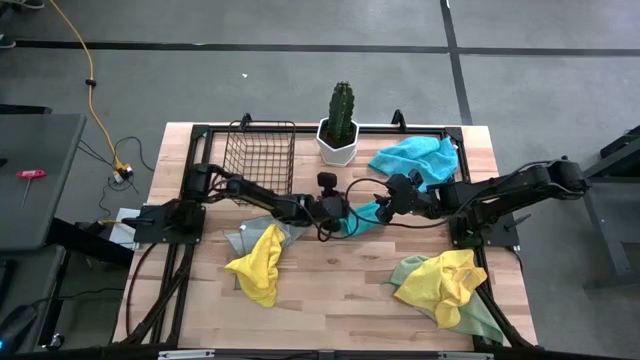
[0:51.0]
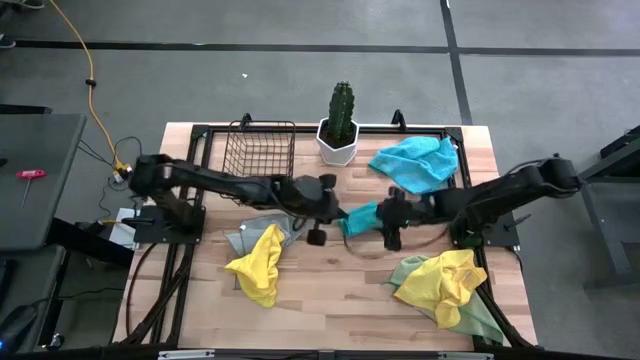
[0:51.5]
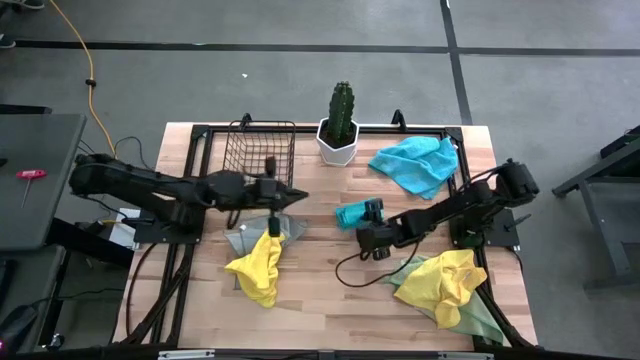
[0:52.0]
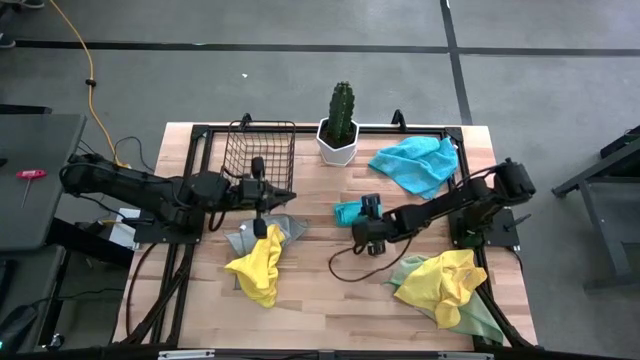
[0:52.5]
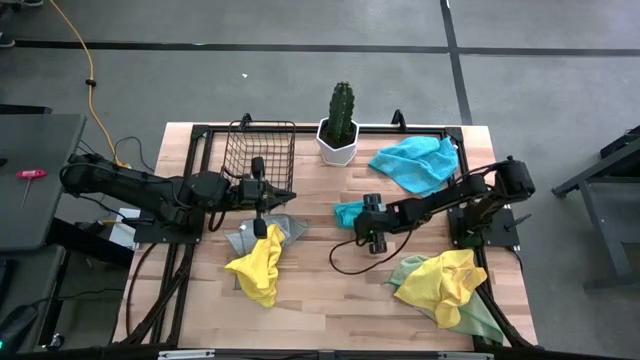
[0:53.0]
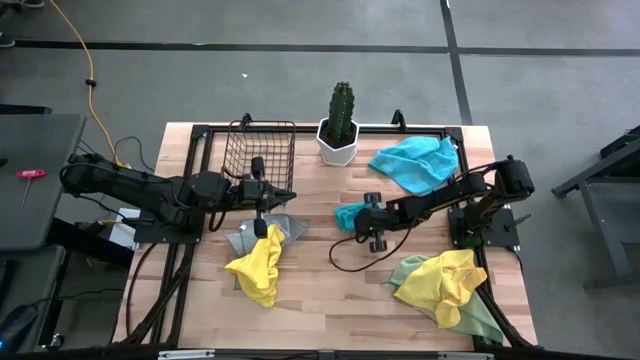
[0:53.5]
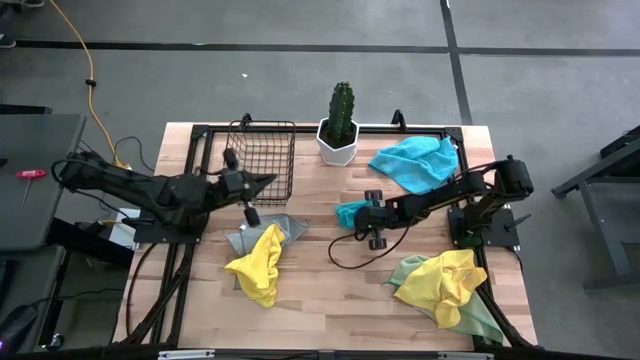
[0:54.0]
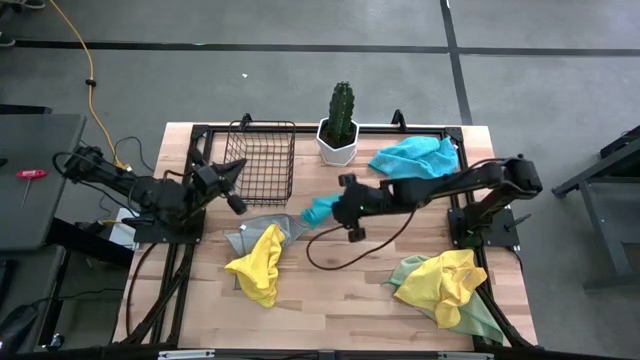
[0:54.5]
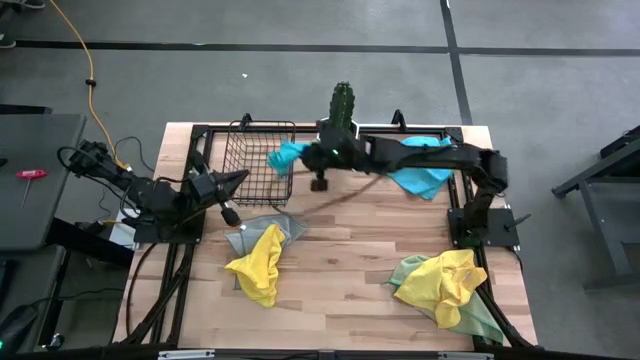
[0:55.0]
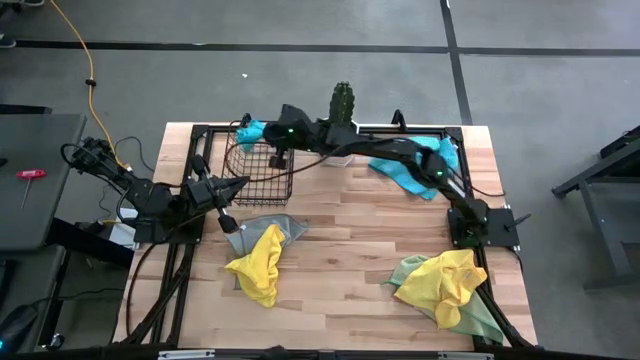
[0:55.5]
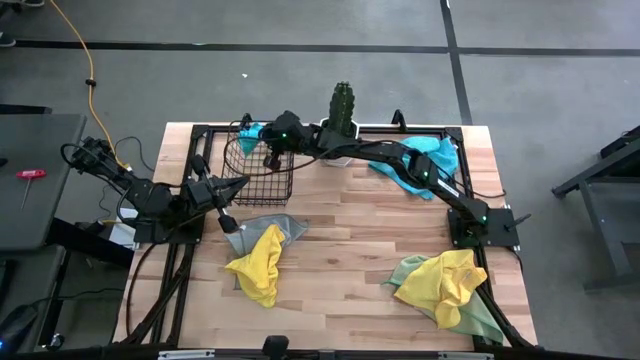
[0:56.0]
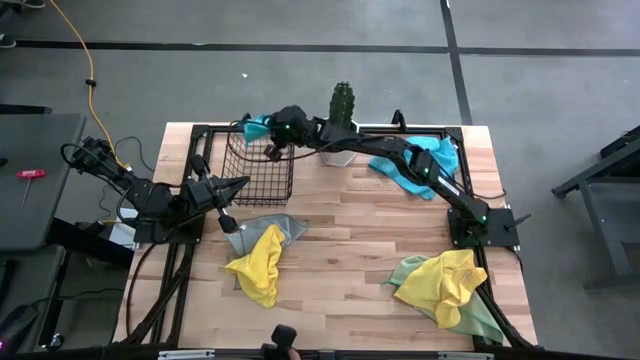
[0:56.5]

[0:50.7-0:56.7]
Task: Fold microfiber towels
Put the folded blue microfiber towel into the mesh basket

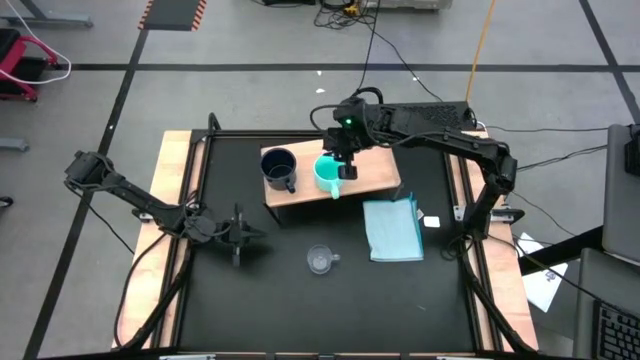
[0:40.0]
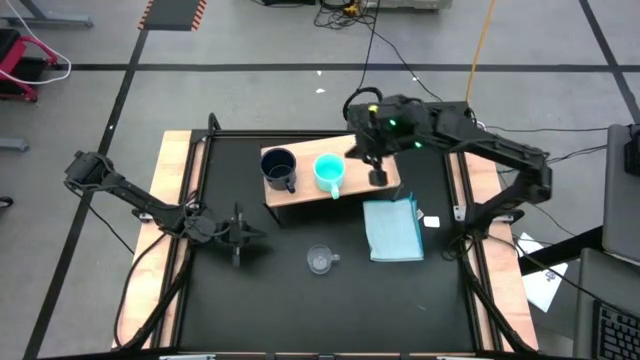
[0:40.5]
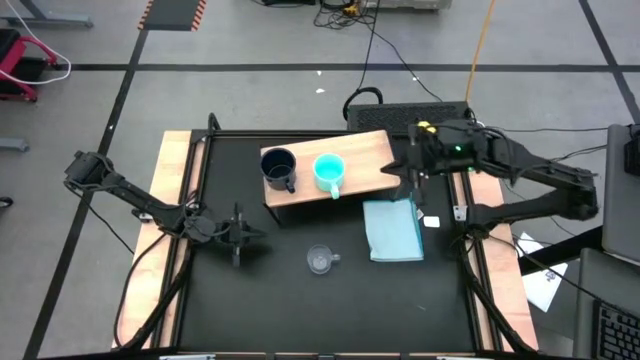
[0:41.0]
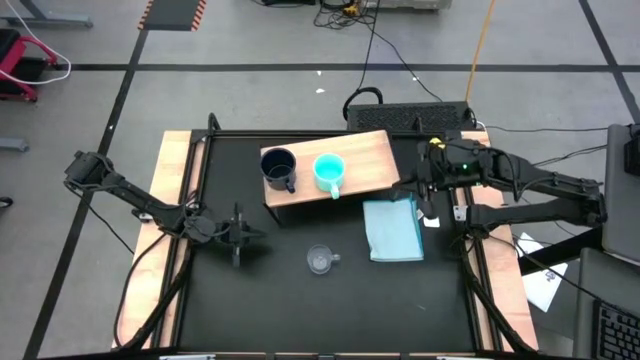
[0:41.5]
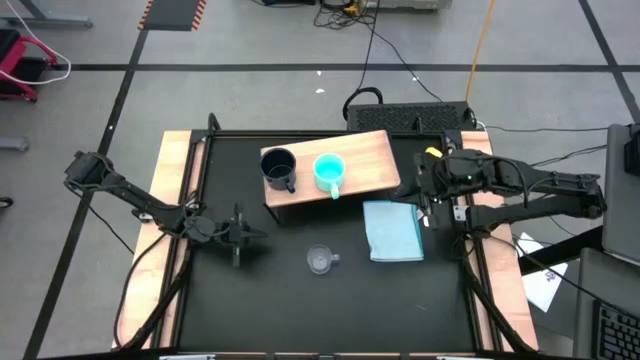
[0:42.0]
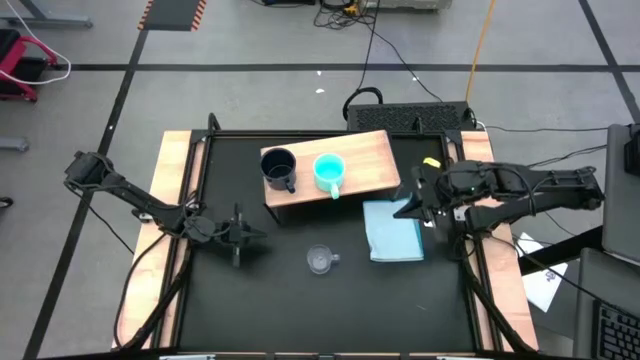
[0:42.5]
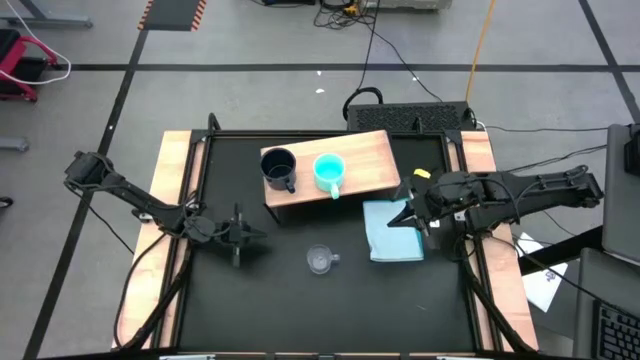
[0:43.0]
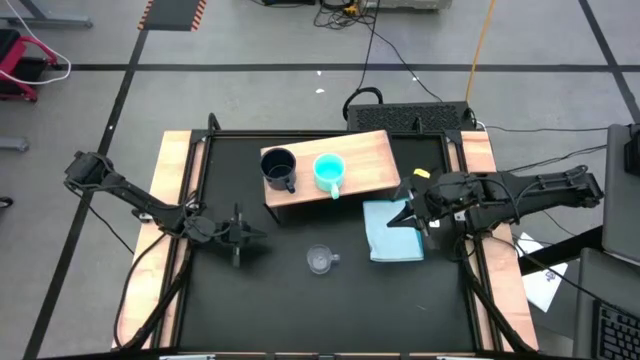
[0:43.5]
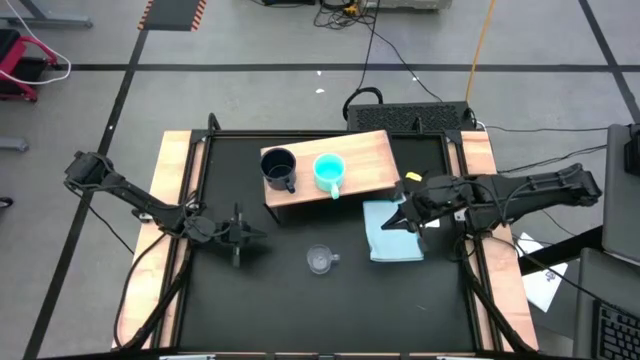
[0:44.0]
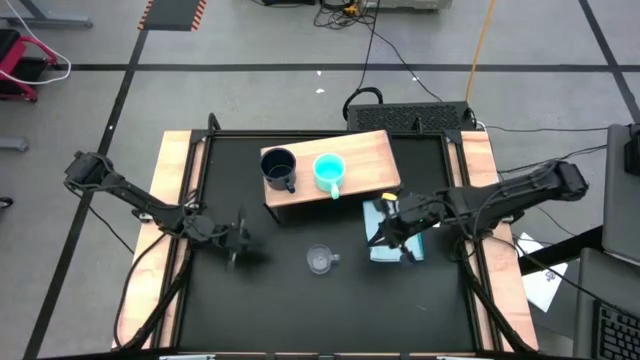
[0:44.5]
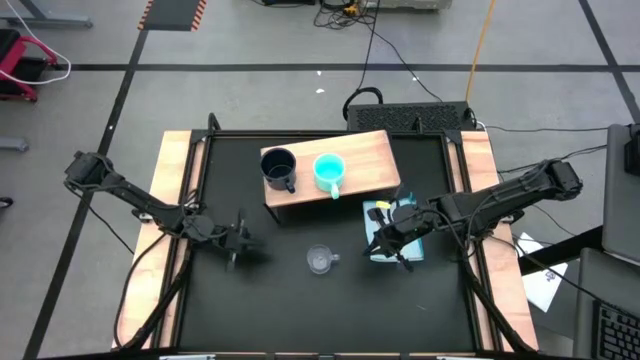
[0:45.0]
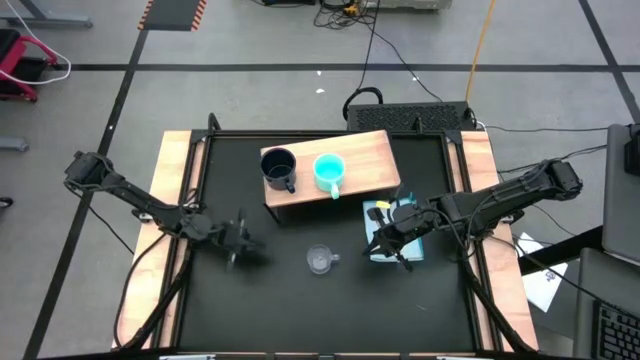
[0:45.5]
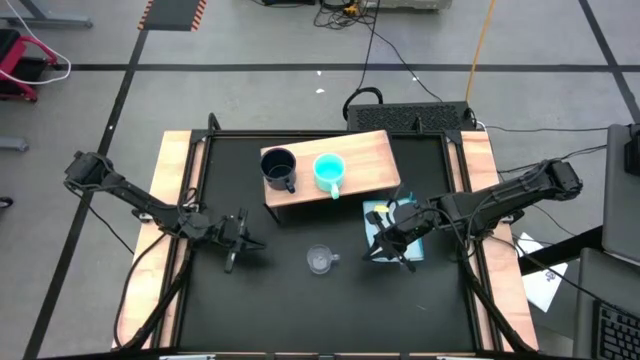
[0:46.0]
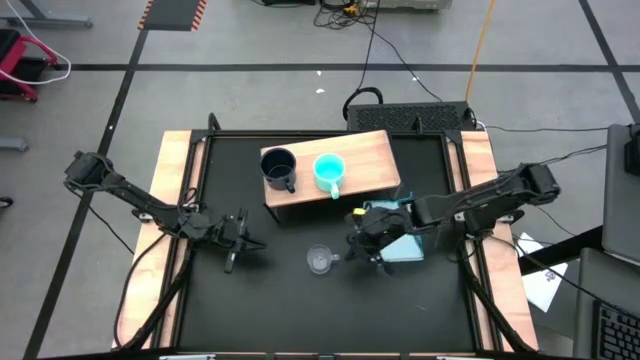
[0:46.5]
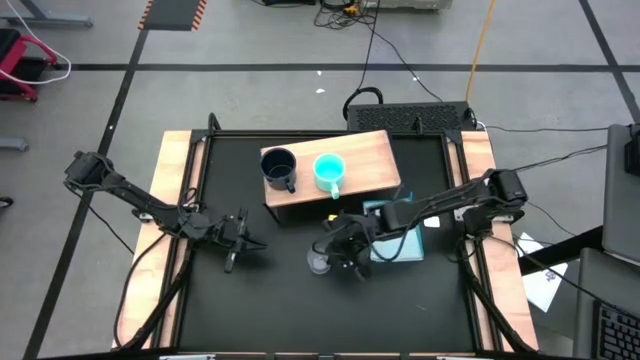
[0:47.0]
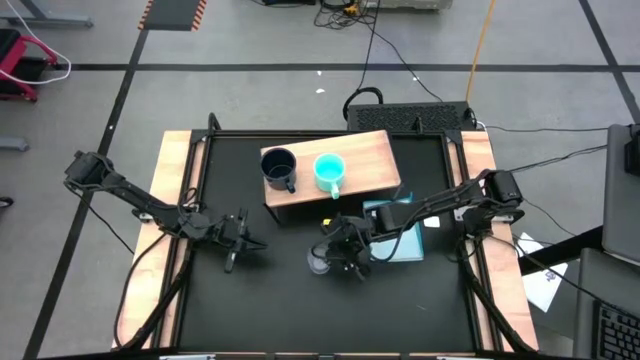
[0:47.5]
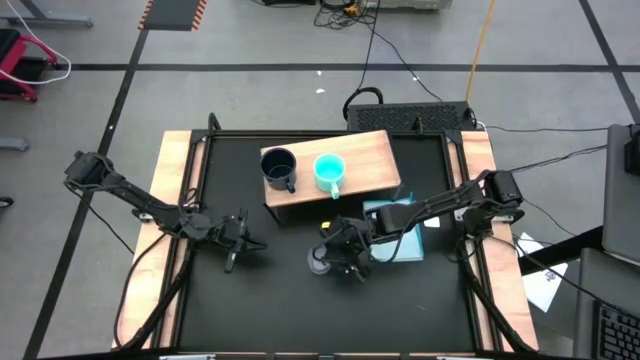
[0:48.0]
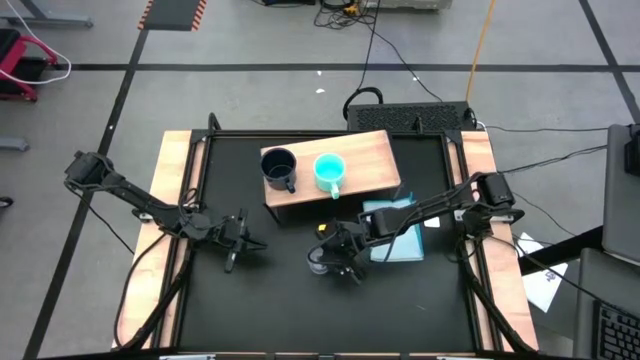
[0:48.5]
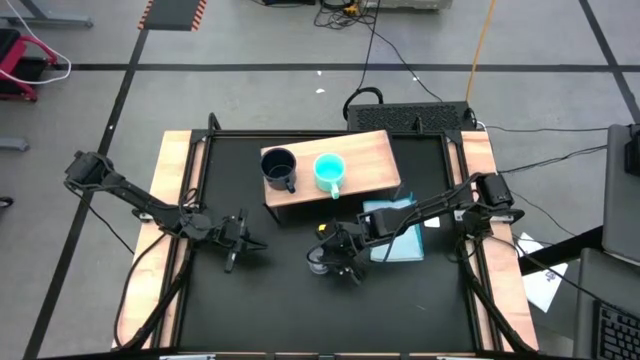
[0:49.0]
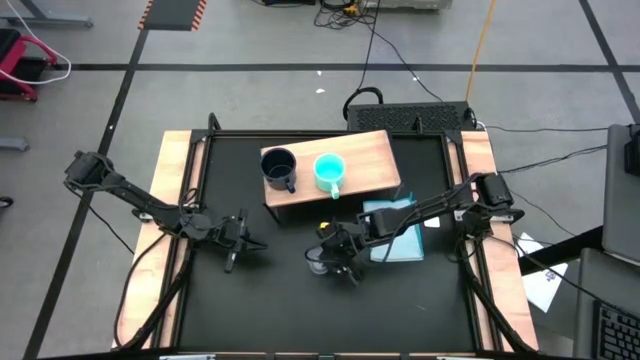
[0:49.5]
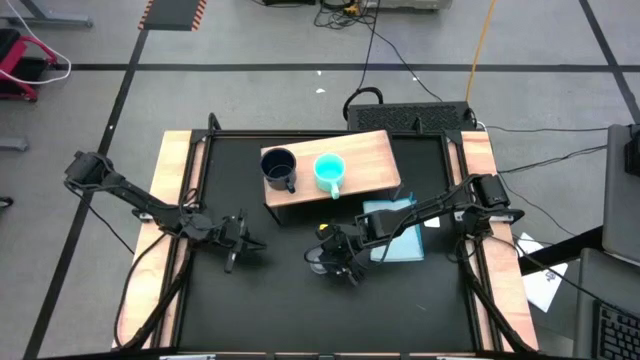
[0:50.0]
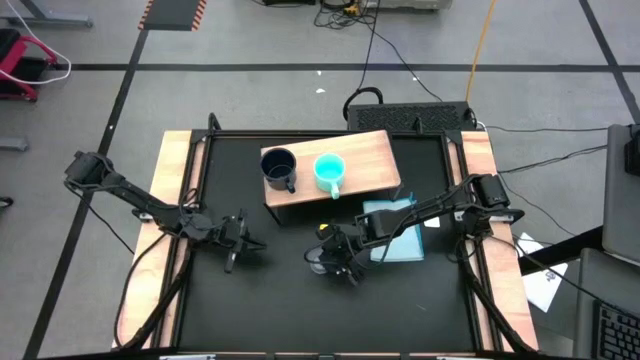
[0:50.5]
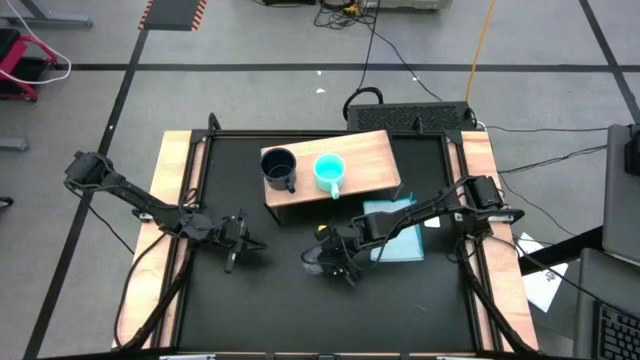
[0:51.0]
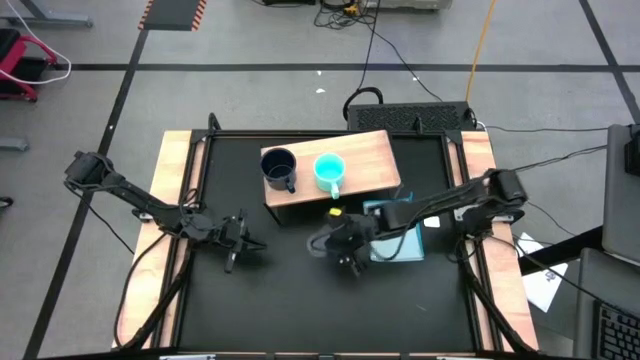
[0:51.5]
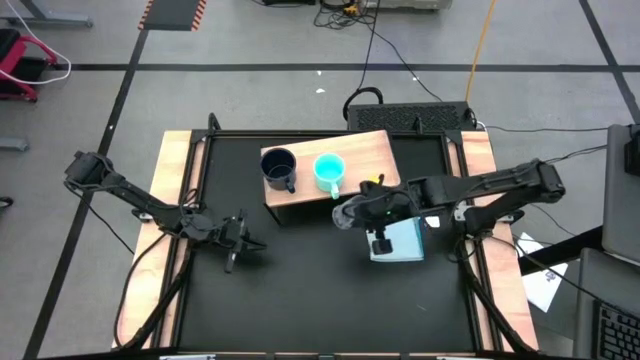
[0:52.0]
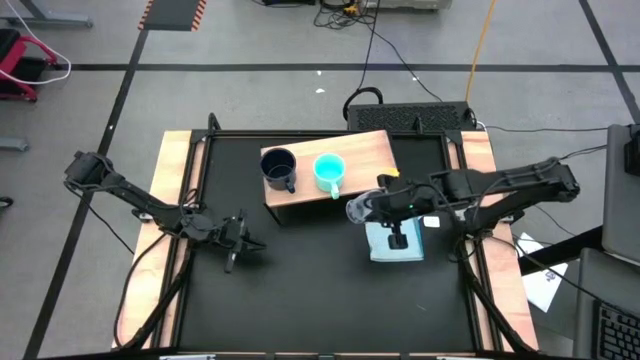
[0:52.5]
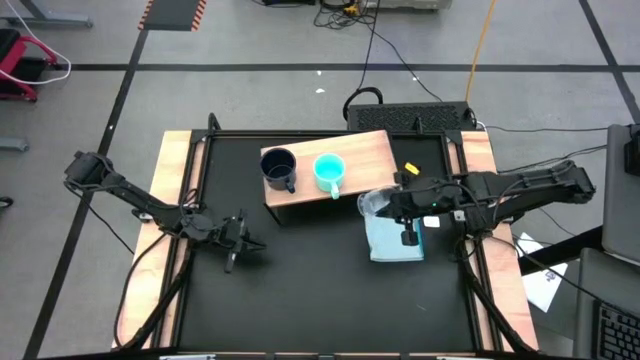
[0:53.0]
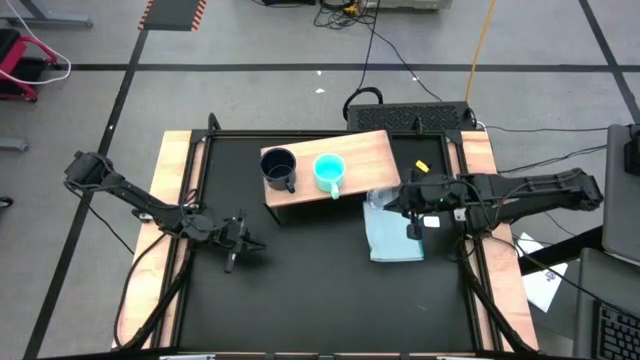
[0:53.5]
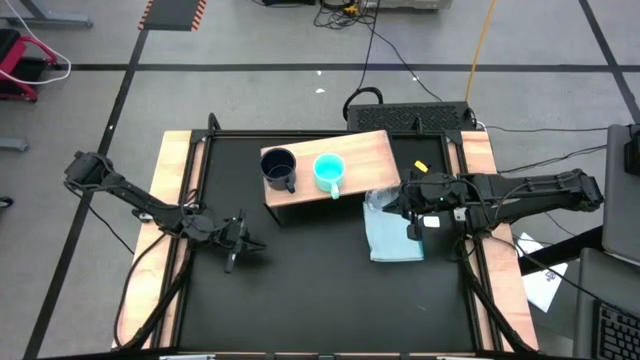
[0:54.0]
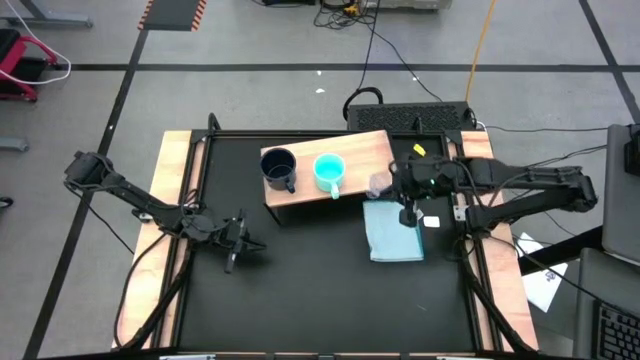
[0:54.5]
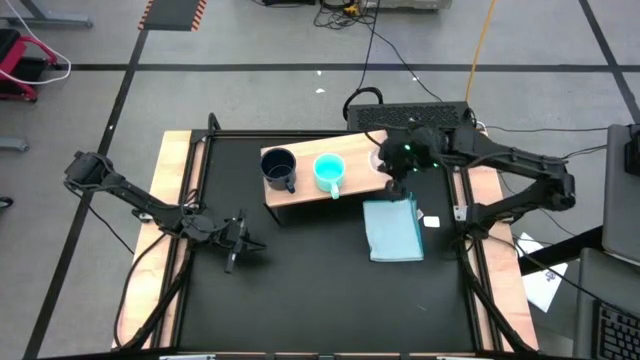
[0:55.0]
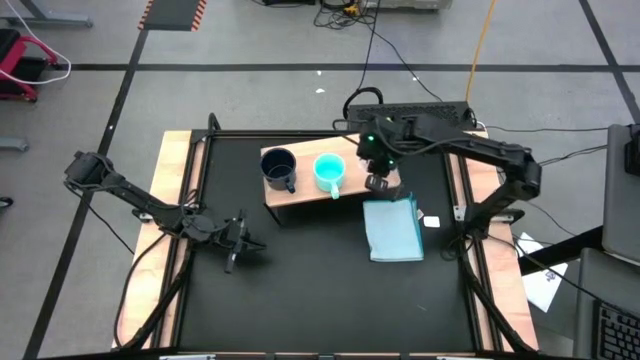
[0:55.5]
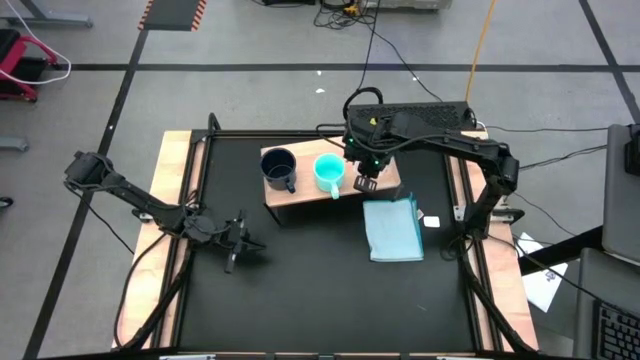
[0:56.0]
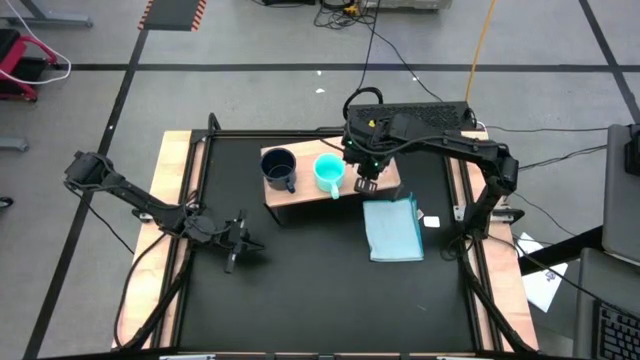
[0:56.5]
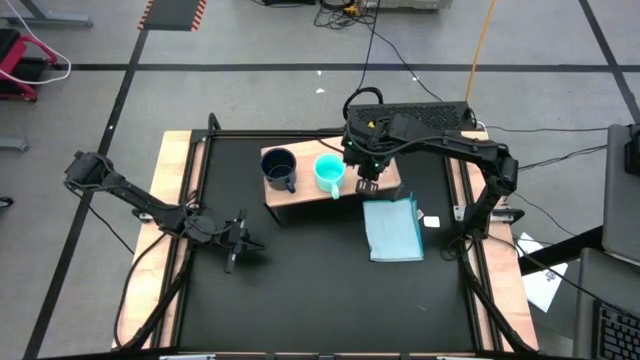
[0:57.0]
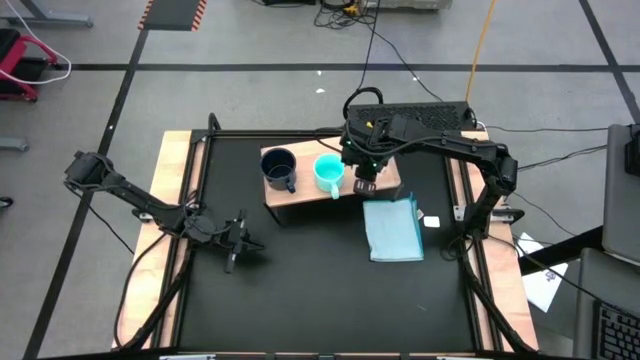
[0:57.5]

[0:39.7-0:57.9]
Task: Stack small to large cups/mugs on shelf
Put the transparent mug on the shelf
